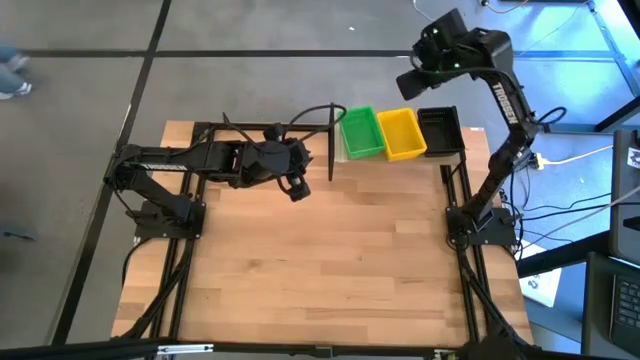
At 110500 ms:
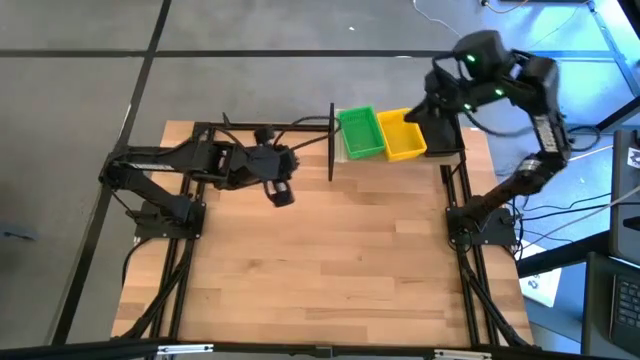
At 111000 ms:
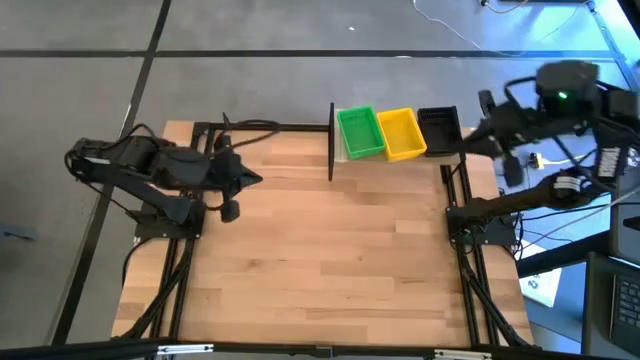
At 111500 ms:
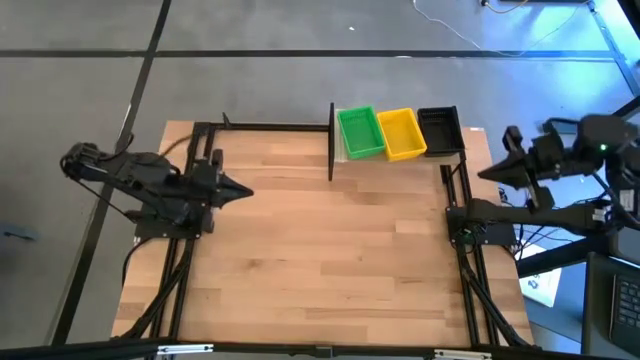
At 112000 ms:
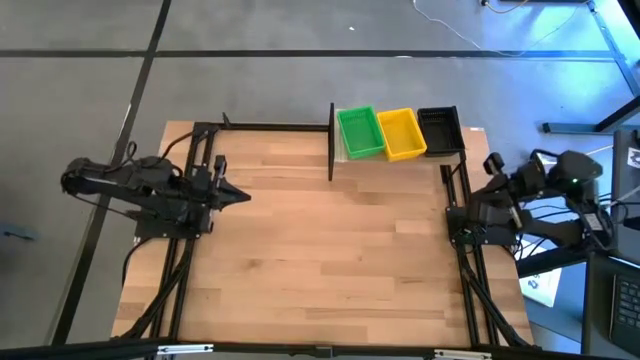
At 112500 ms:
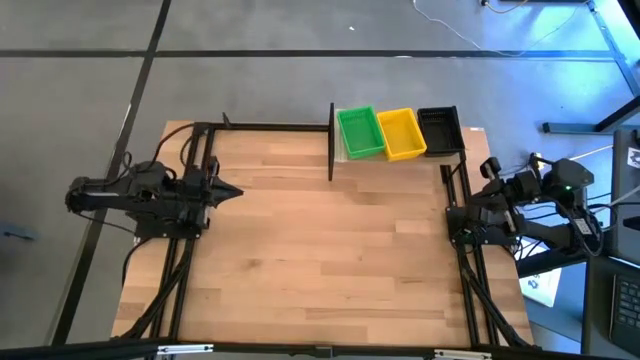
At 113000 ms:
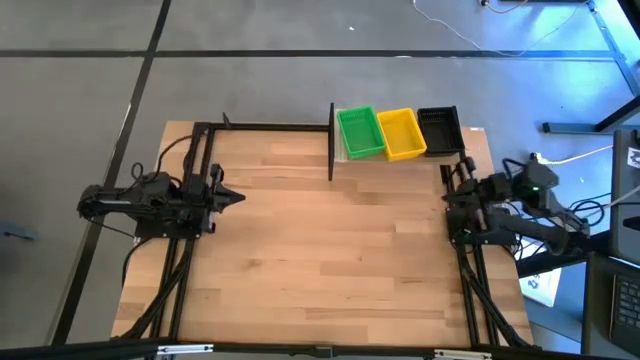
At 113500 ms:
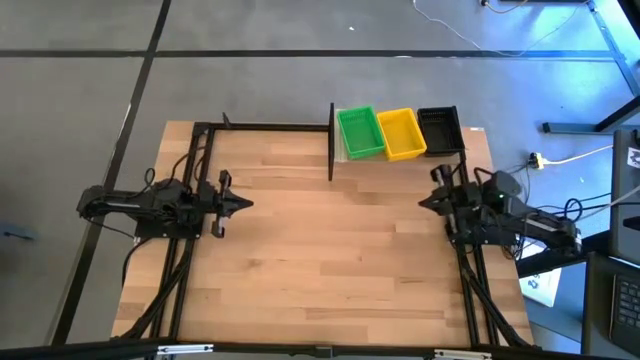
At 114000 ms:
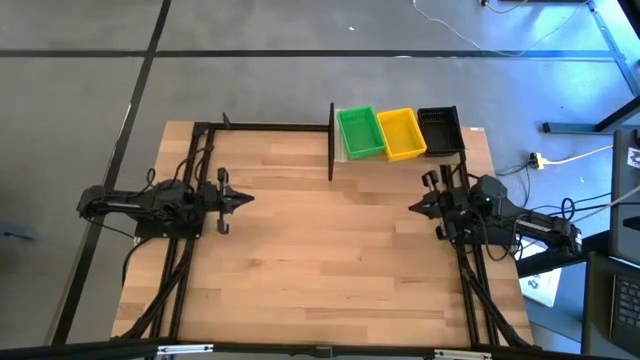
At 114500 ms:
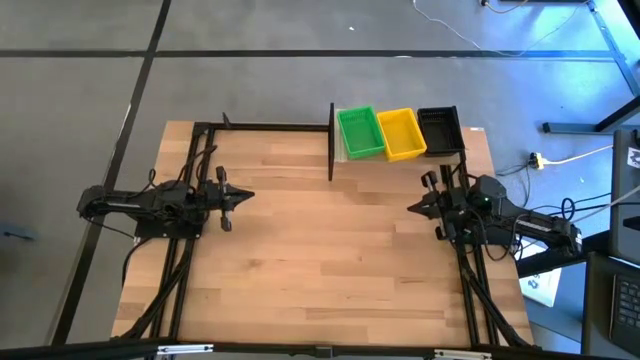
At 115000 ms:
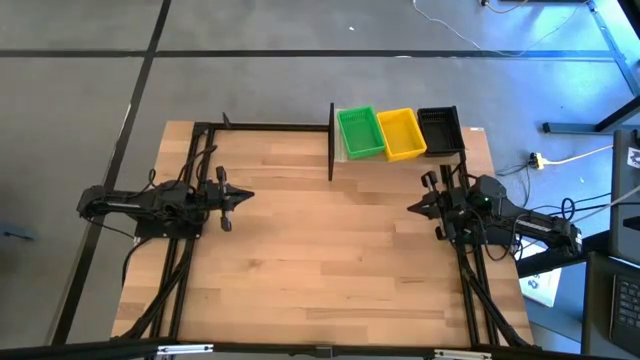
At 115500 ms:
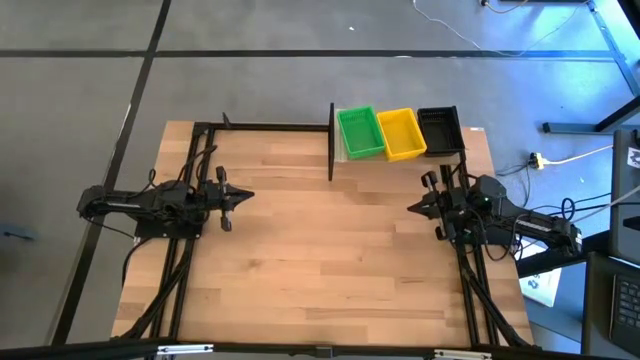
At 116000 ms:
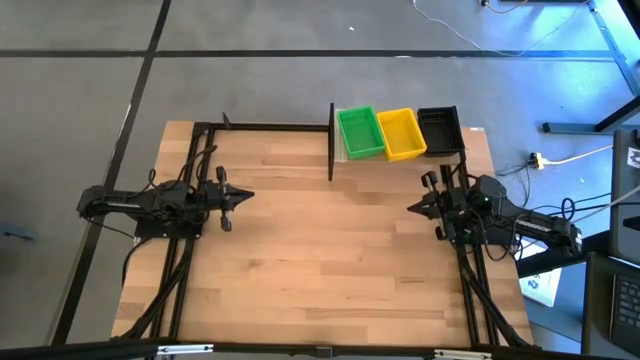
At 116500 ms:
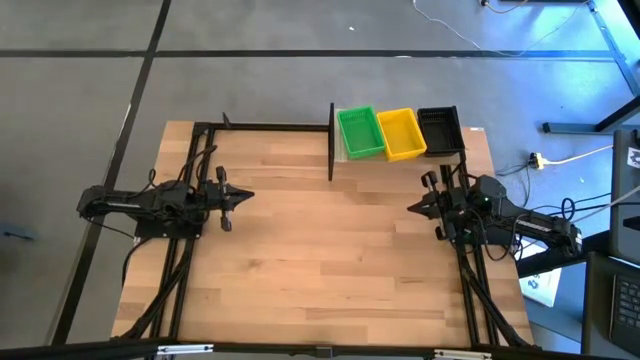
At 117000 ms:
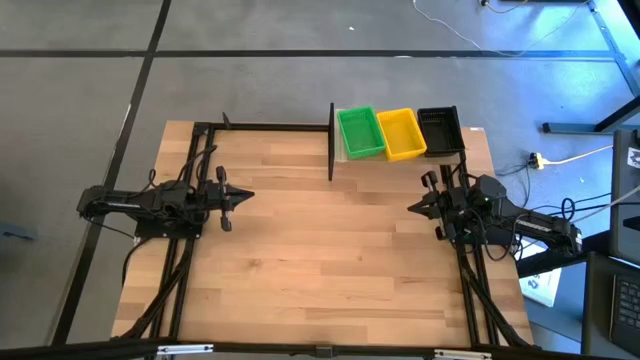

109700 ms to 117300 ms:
Task: Stack baskets on shelf by color
Return to Home Position

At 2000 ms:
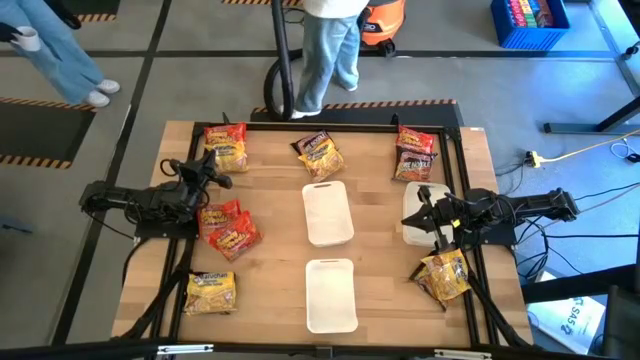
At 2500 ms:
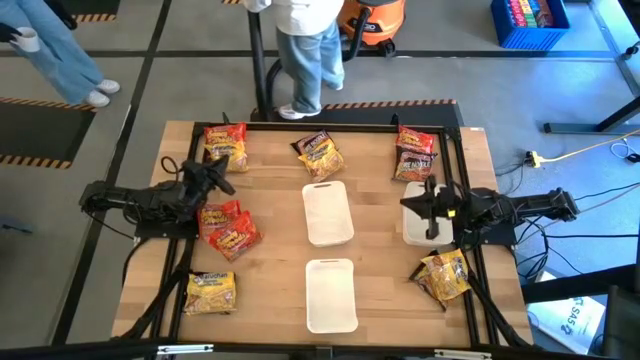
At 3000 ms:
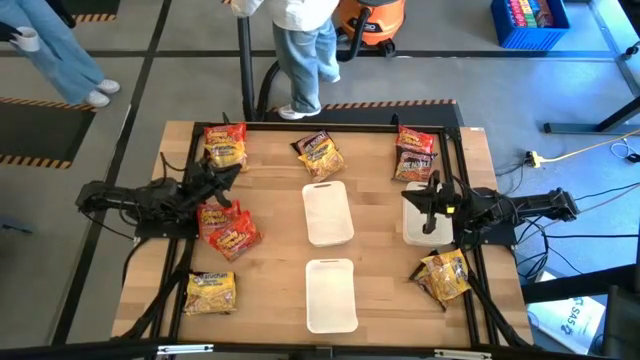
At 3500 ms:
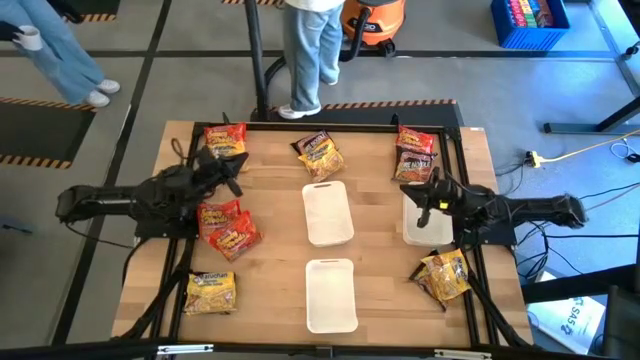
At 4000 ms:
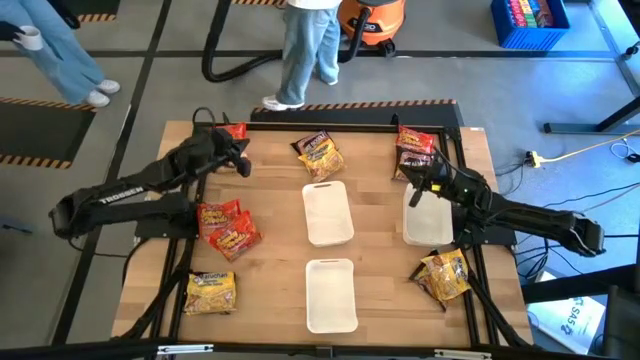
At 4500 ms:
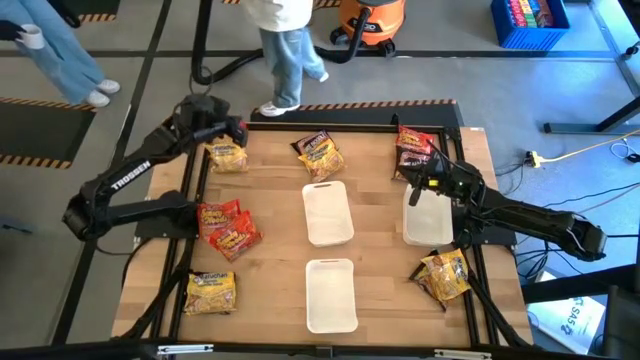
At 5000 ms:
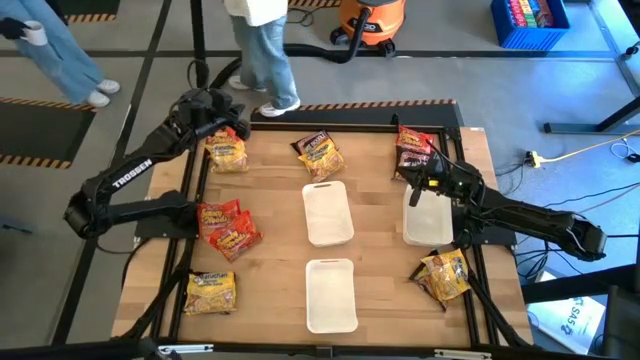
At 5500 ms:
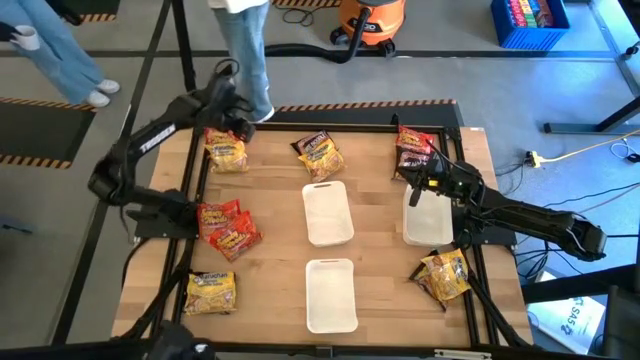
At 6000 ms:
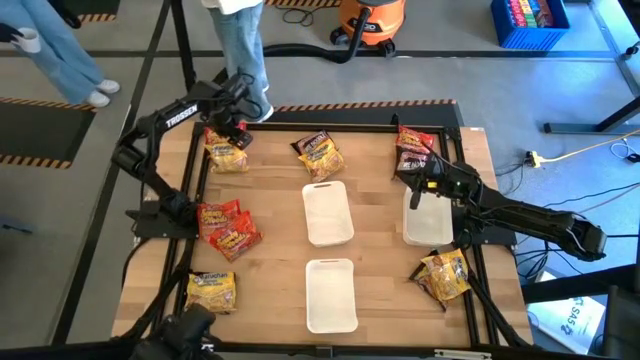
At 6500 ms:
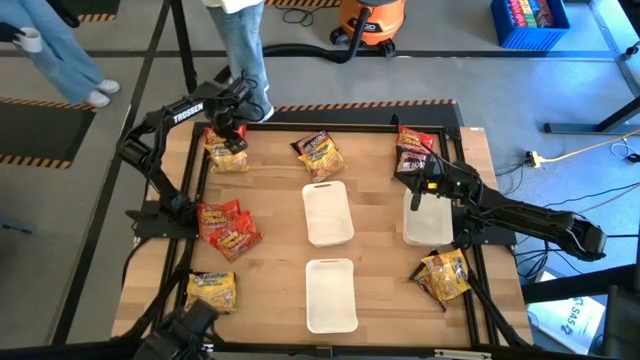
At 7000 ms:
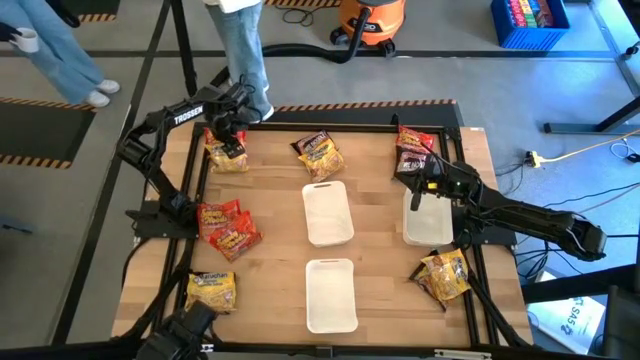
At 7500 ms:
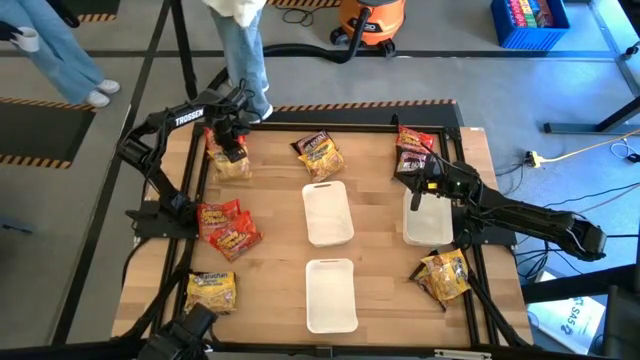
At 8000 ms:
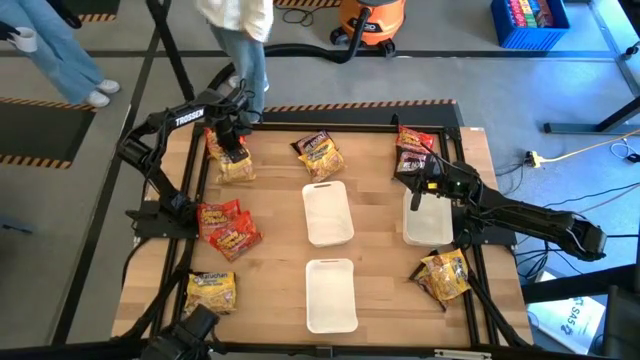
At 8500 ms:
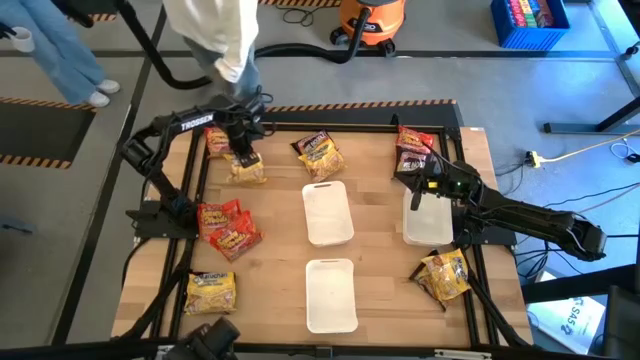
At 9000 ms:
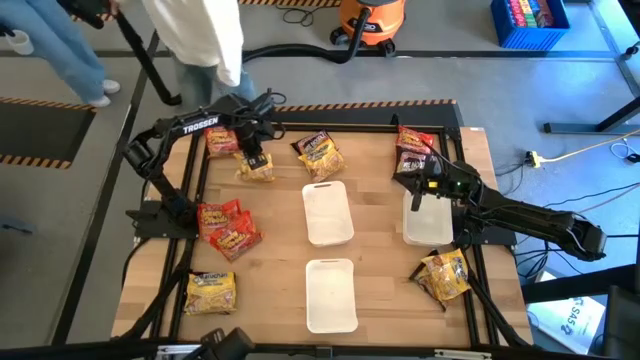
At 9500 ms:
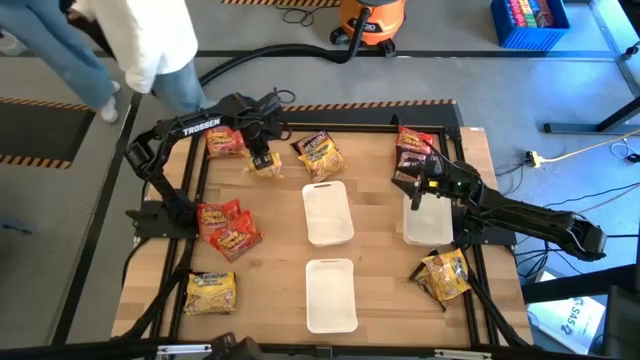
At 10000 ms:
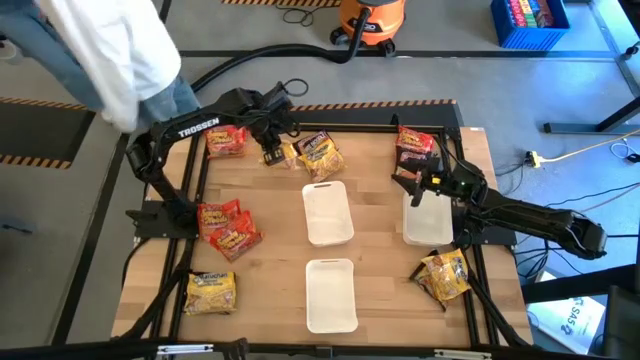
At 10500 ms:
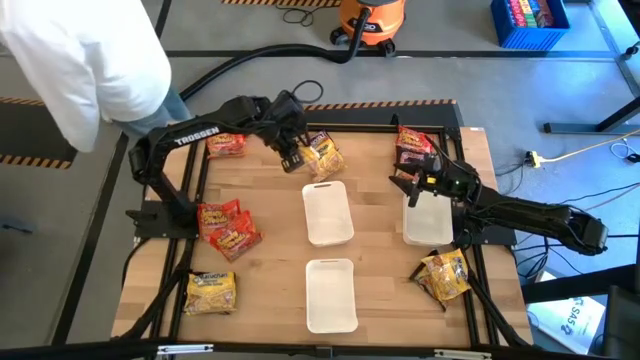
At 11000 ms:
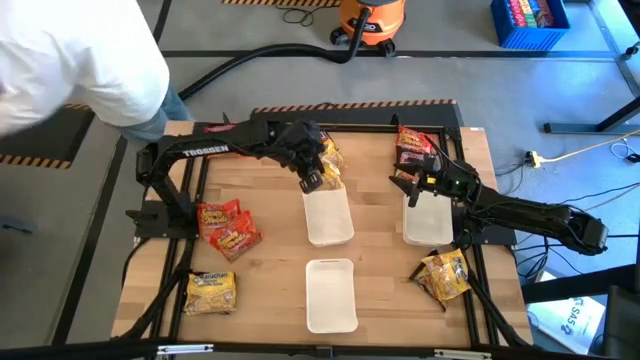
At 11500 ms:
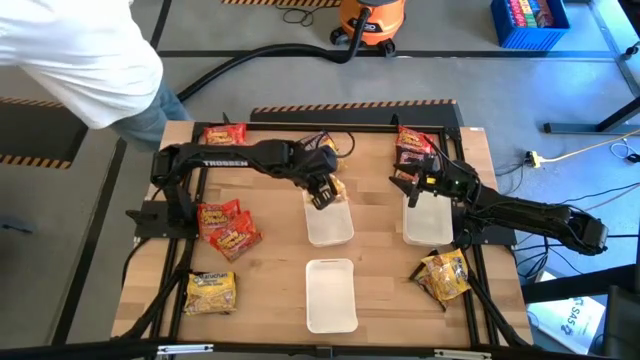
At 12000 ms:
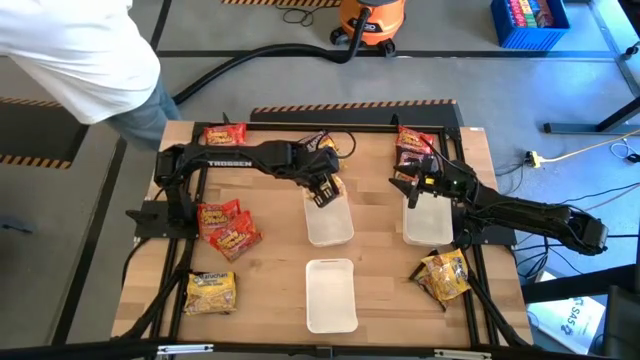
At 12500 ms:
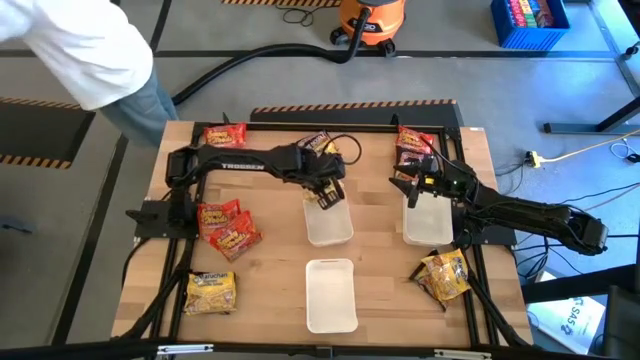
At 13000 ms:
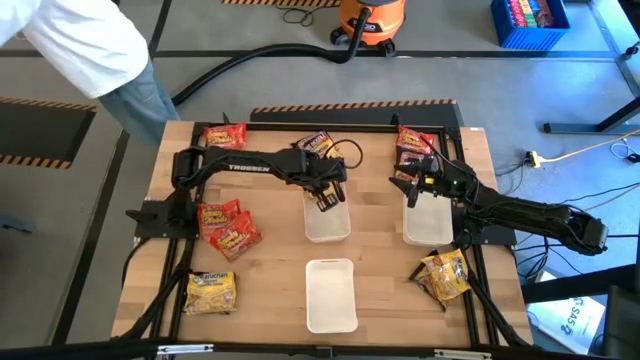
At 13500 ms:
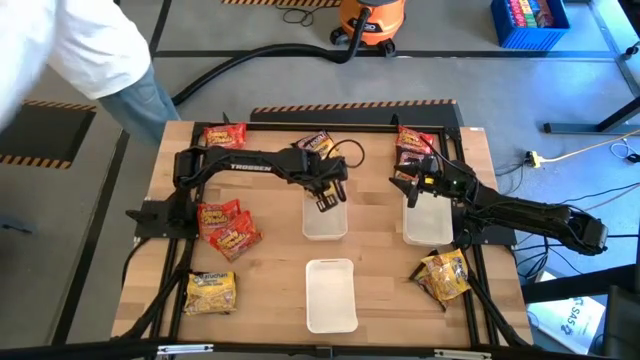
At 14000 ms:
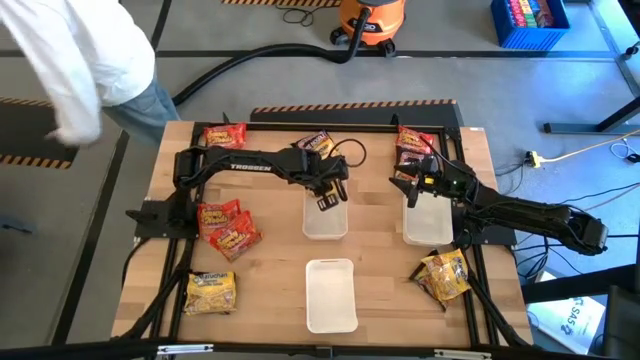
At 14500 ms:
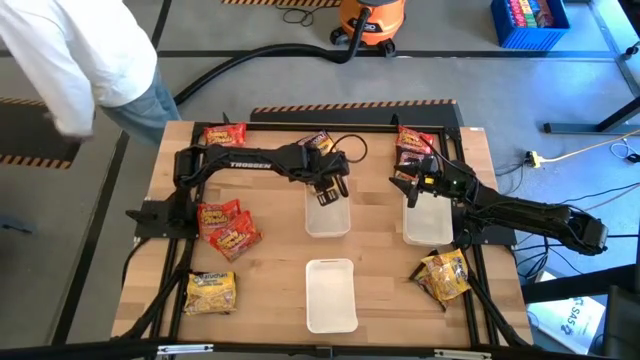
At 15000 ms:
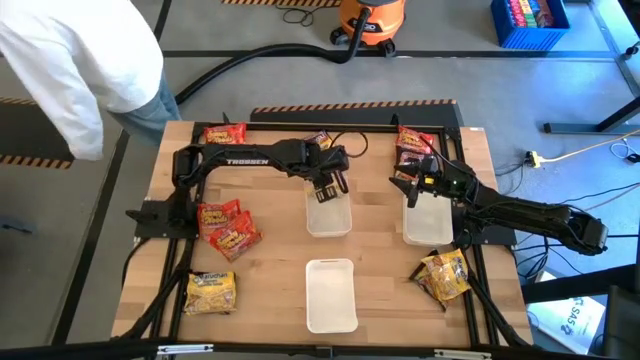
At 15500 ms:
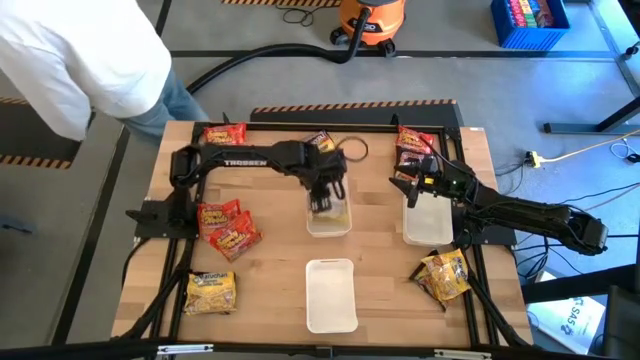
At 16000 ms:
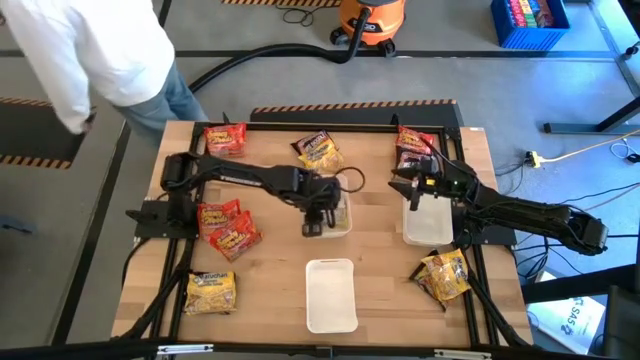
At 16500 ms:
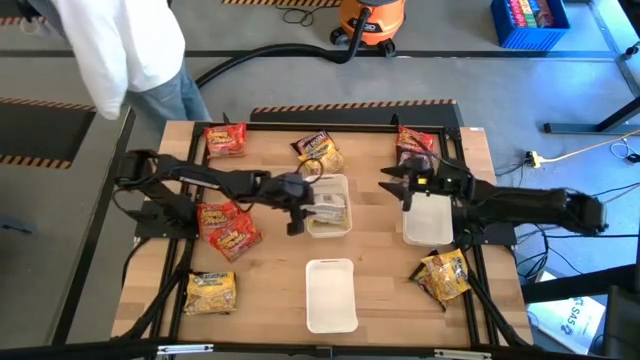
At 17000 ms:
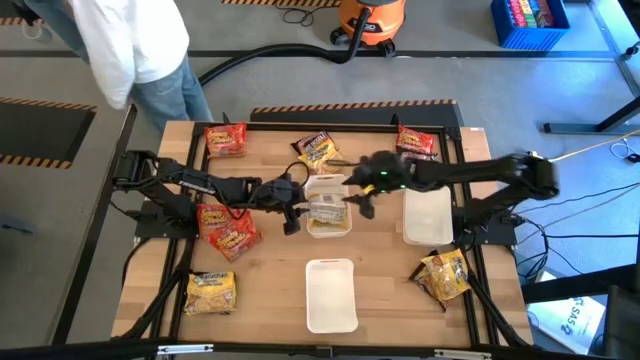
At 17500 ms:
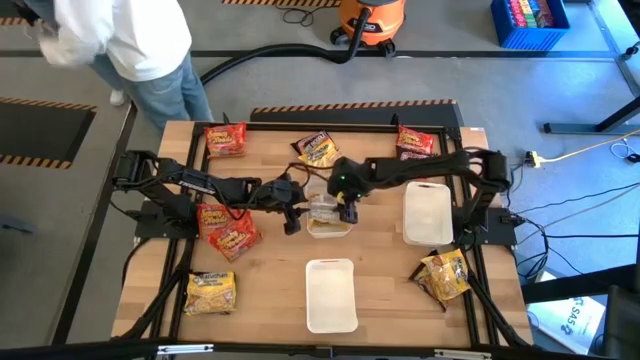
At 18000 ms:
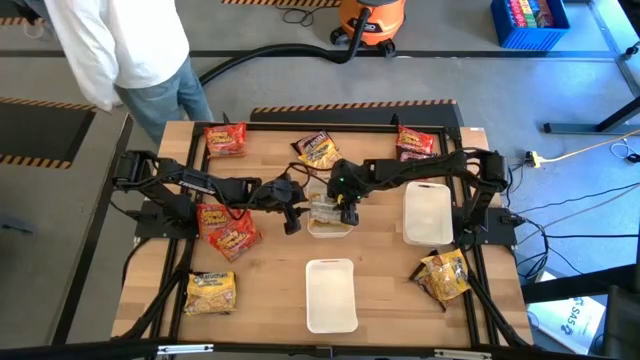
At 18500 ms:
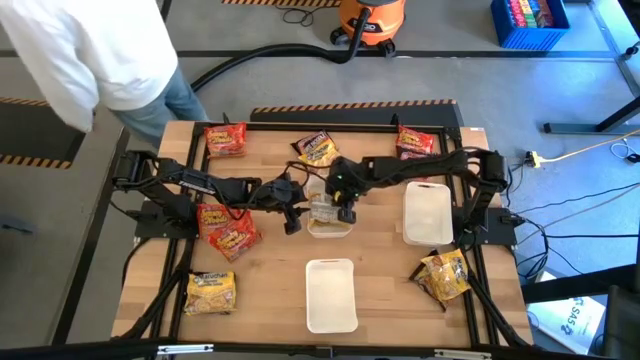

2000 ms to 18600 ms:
Task: Sort Maruchan noodles
Put the top left yellow noodle pack in the top left white bin
